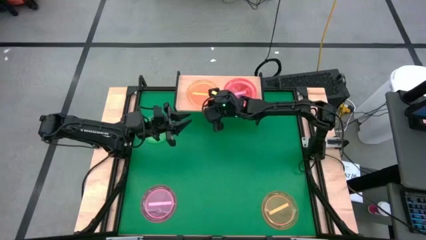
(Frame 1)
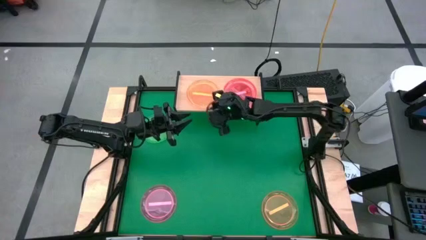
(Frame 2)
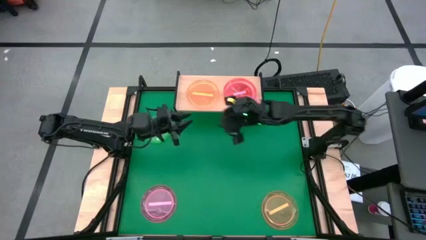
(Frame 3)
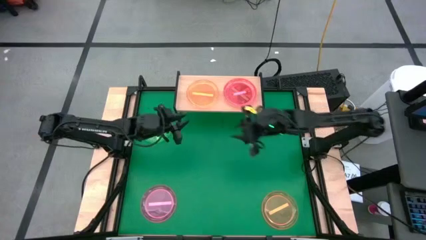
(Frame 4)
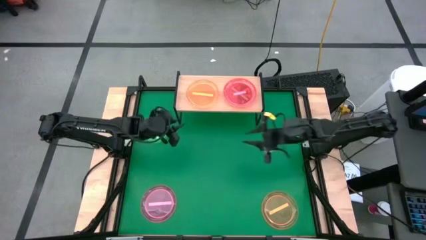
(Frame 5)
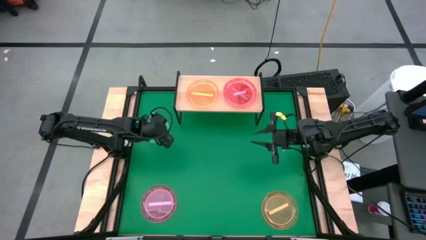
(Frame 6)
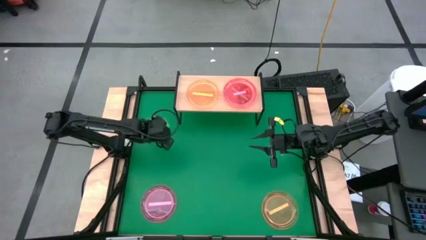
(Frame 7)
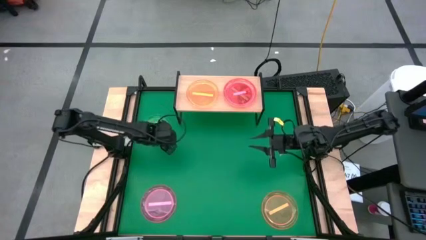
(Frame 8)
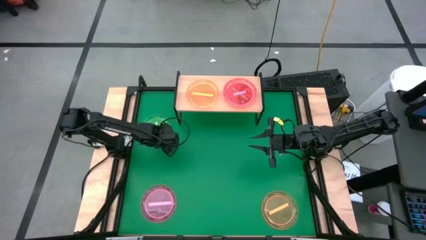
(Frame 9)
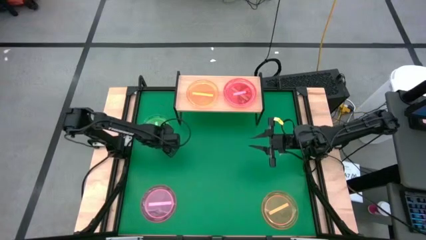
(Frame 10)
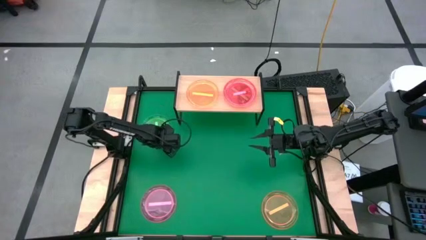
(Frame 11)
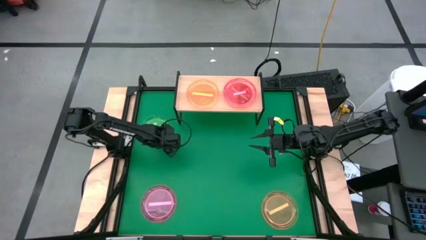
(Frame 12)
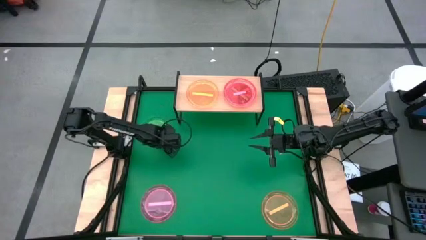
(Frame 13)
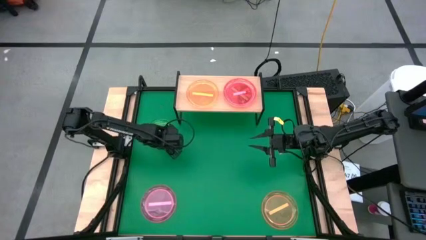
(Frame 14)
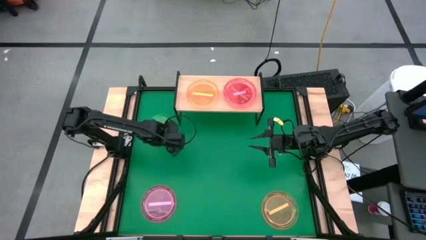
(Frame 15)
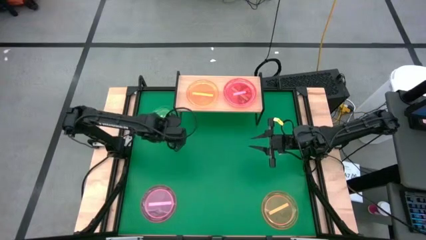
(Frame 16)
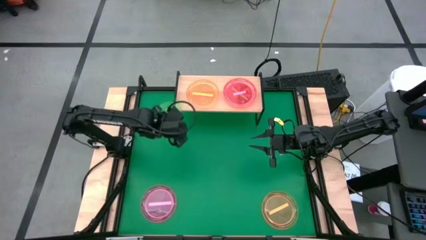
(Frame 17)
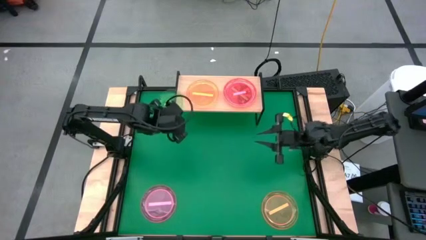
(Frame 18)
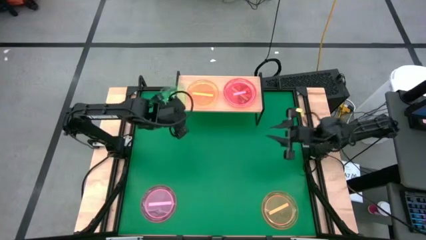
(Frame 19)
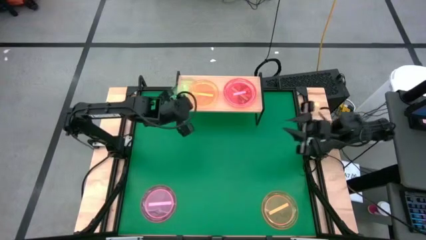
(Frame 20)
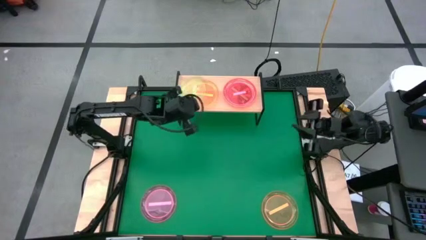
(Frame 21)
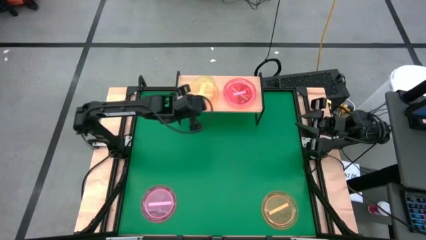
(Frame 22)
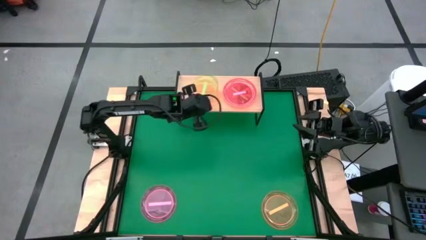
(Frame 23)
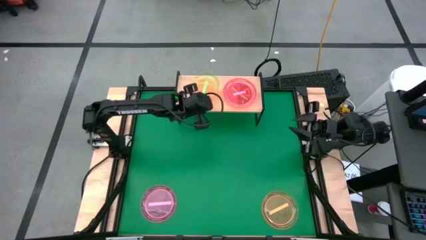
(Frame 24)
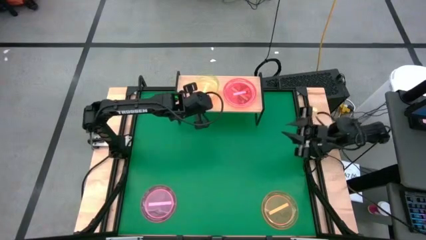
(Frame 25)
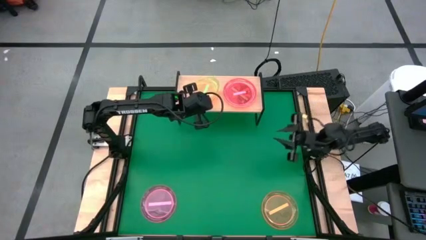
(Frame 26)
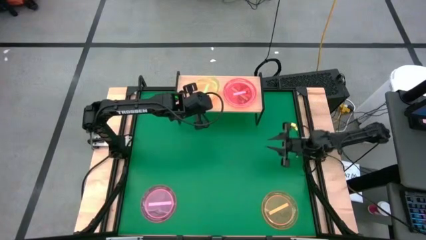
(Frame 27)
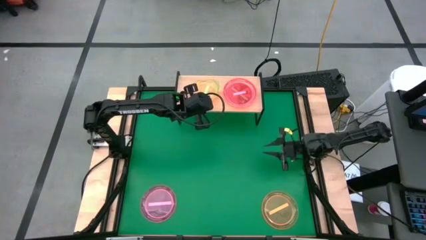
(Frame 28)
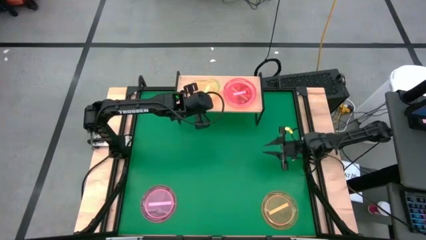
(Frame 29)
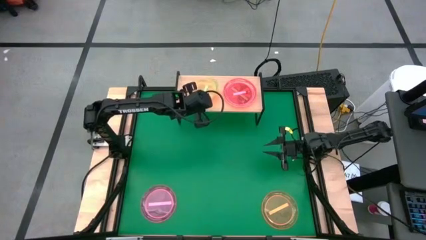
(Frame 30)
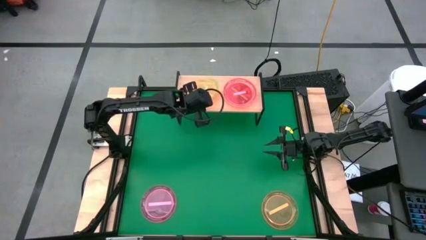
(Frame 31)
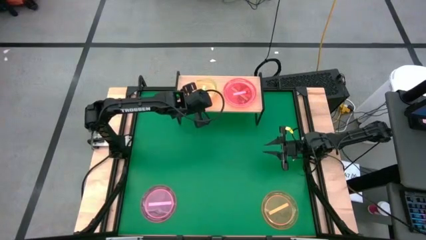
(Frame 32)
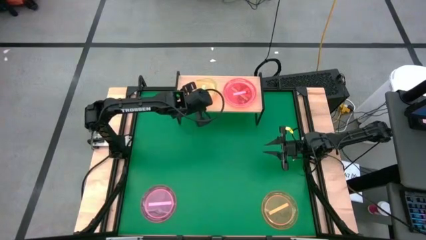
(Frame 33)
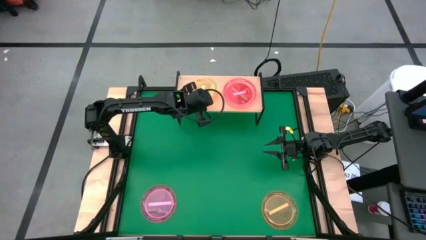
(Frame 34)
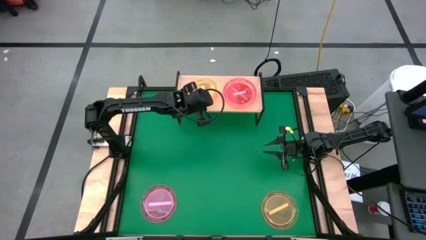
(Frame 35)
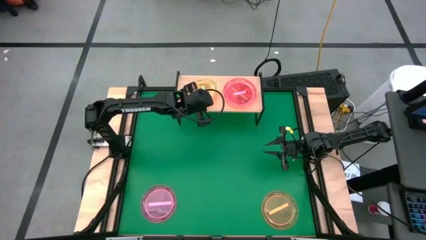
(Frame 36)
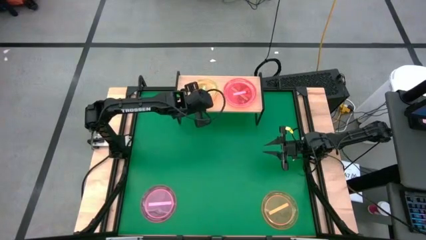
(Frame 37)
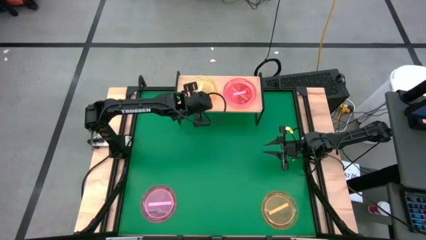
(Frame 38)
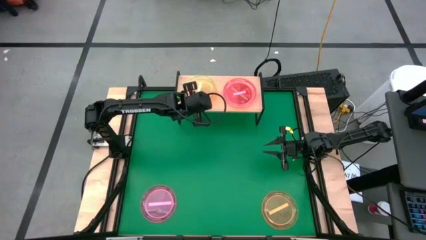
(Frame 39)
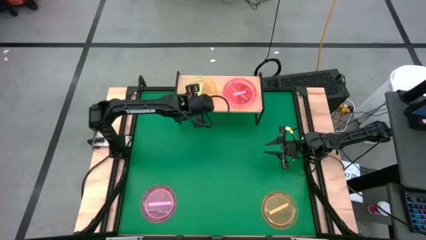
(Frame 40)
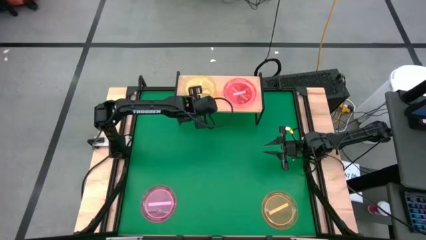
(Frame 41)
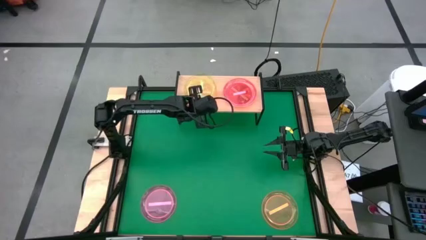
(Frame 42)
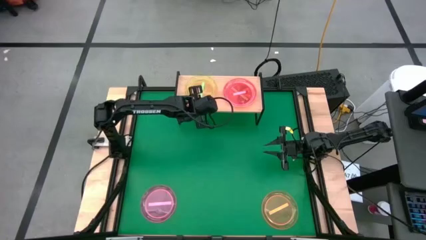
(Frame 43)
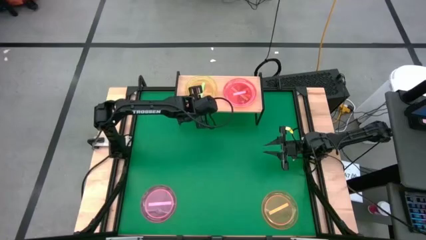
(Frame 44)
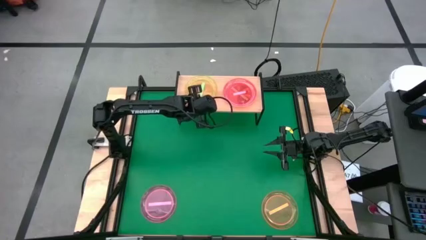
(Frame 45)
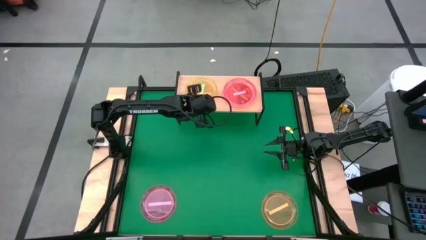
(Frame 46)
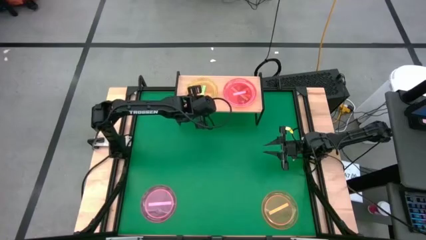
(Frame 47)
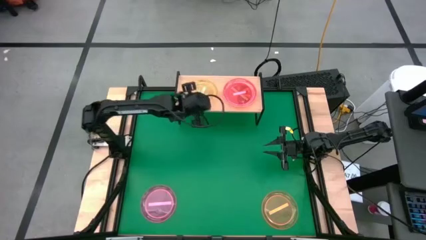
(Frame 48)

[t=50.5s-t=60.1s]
Task: Place and stack plates onto a shelf
Stack the green plate on top of the orange plate on the shelf

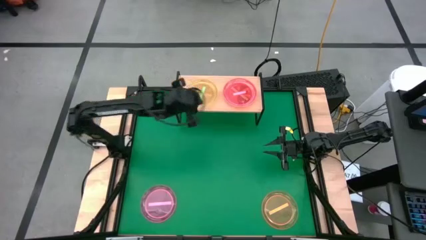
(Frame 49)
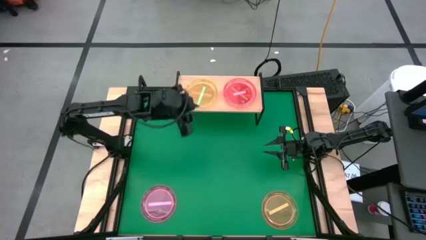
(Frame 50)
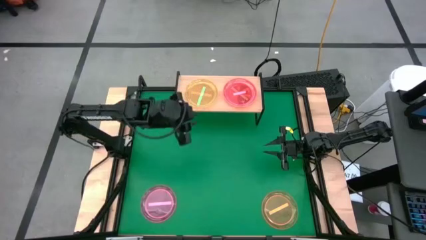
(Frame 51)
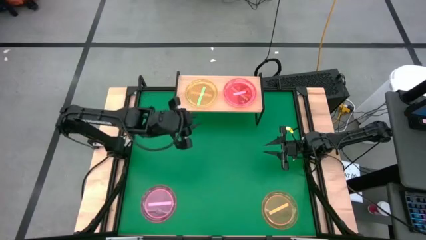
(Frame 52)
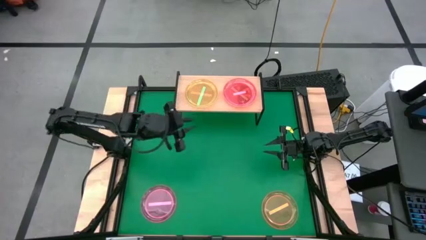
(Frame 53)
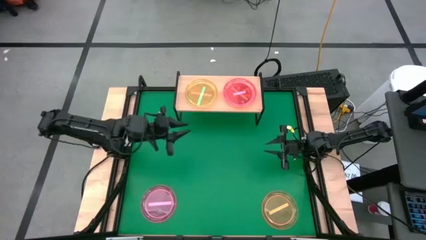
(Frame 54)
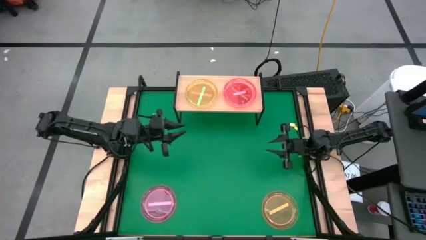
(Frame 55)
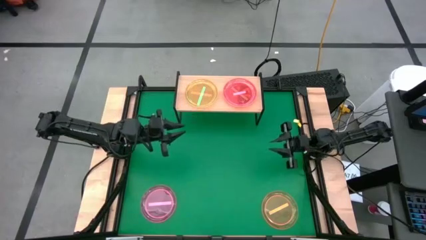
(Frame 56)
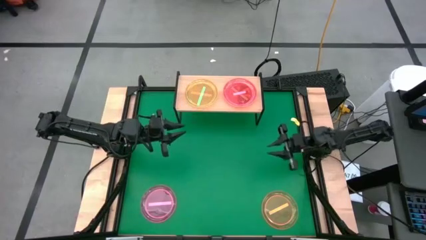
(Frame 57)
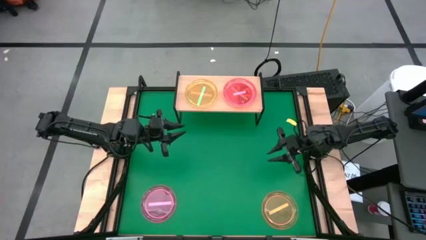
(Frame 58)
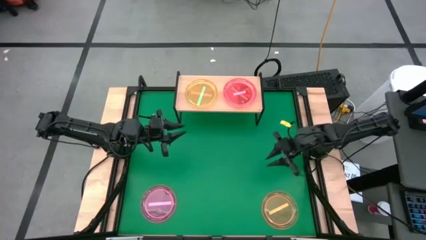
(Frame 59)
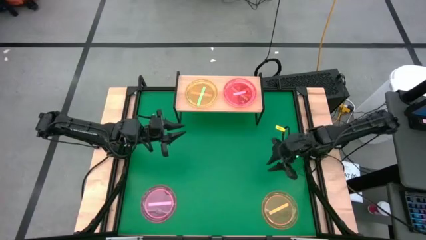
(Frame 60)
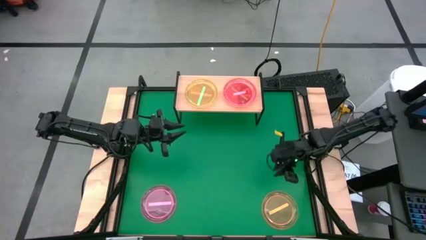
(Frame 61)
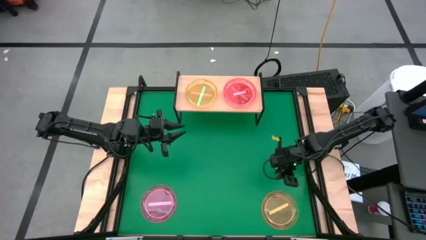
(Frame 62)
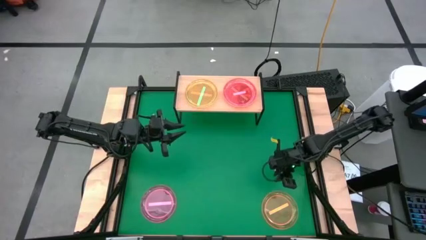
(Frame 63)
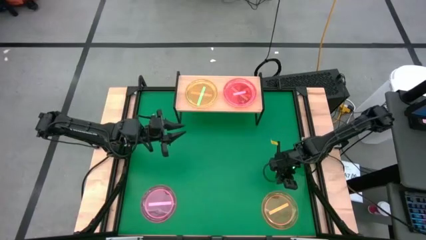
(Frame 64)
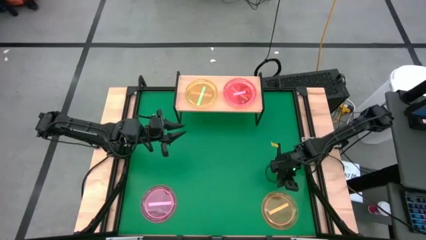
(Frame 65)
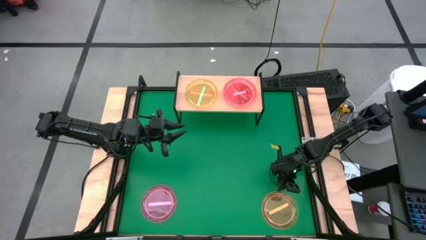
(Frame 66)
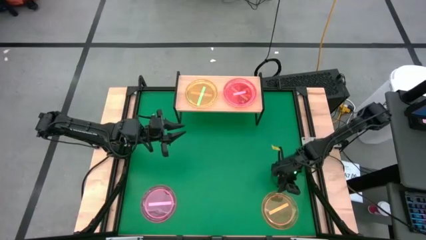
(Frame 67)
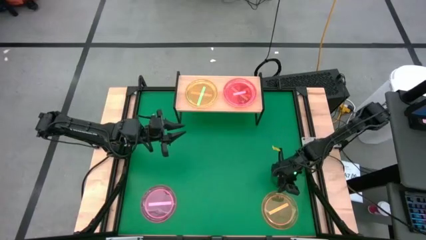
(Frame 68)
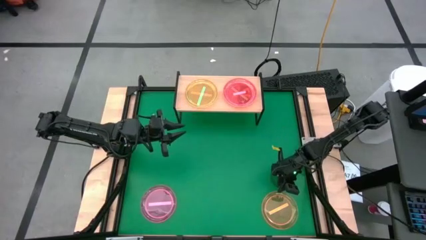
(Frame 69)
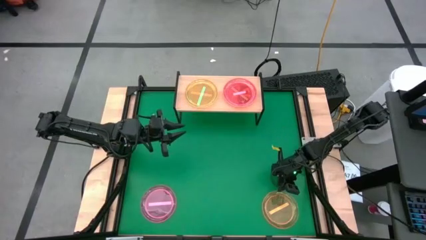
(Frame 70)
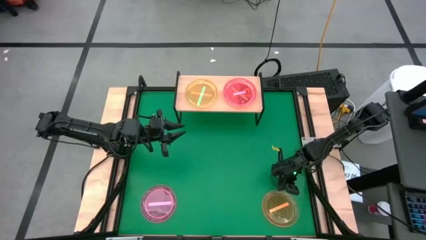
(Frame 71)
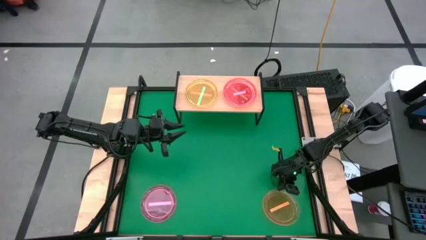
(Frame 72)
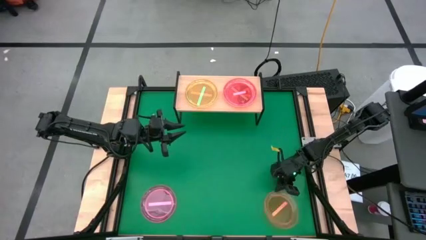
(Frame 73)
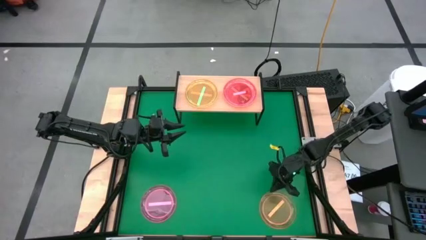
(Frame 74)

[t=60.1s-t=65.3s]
Stack the orange plate on top of the other orange plates on the shelf

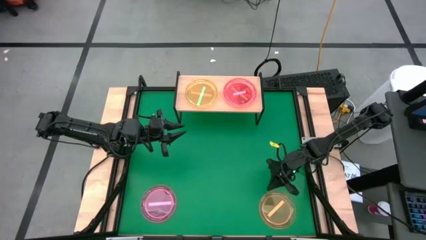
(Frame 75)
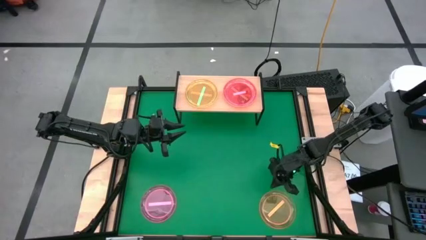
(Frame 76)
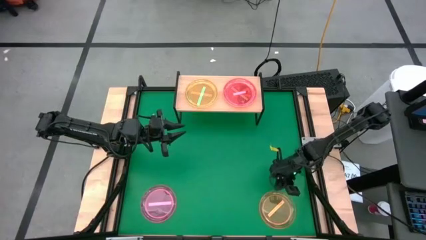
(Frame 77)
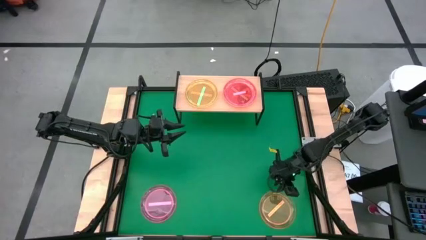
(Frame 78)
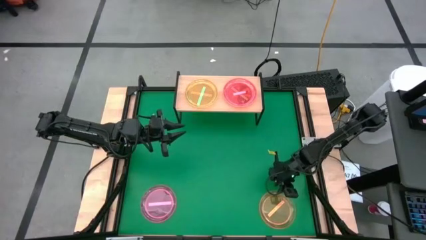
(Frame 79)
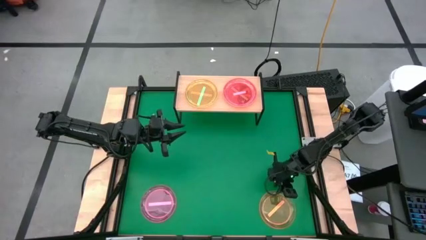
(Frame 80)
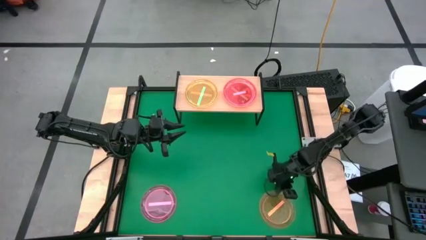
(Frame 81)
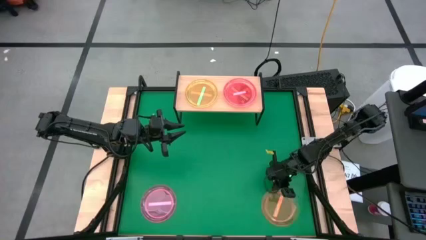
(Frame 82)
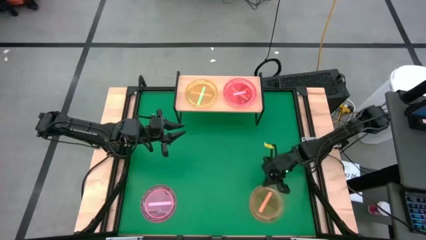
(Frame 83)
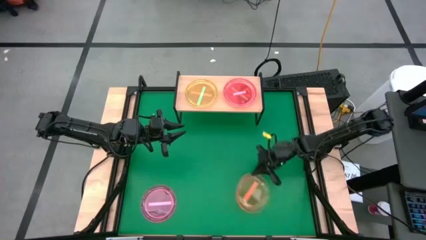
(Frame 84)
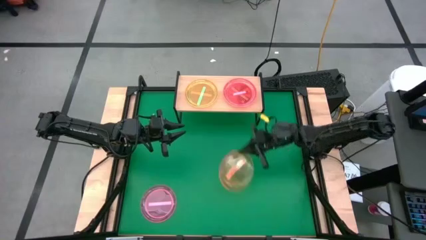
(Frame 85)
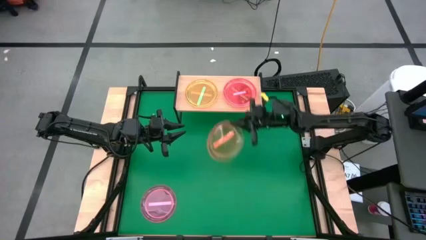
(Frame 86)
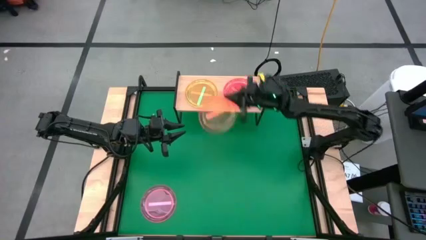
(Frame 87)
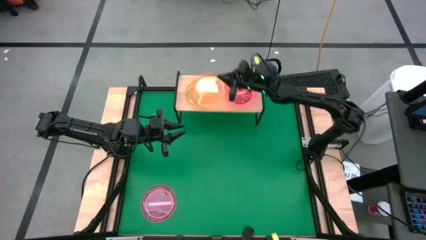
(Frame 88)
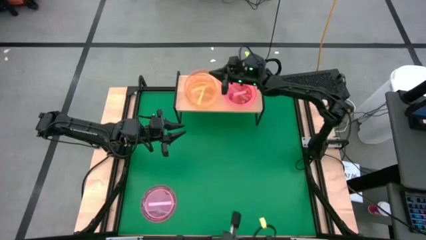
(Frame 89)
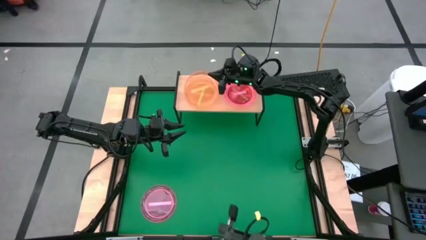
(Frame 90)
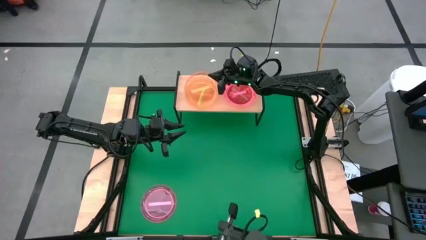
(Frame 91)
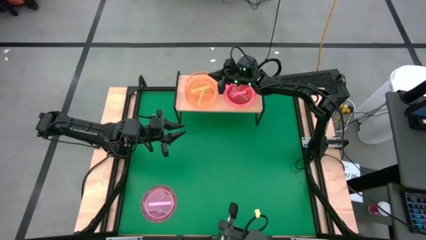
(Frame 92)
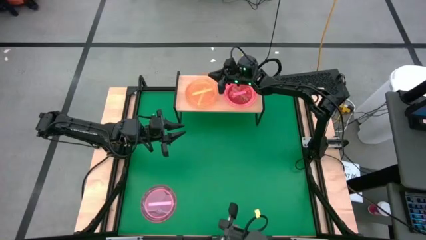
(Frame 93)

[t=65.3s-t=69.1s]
Stack the orange plate on top of the other orange plates on the shelf
